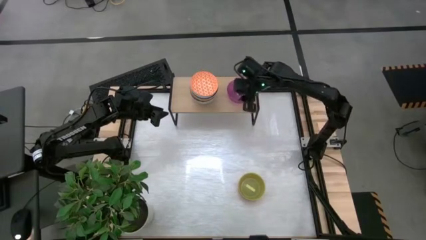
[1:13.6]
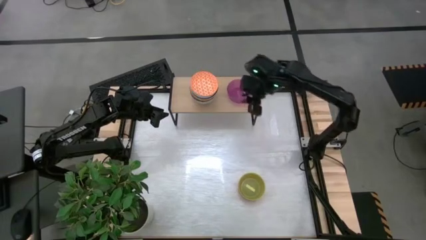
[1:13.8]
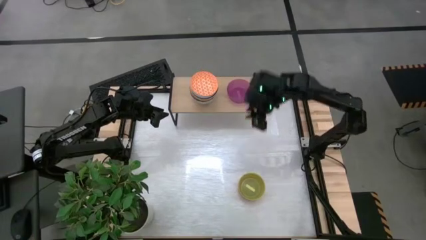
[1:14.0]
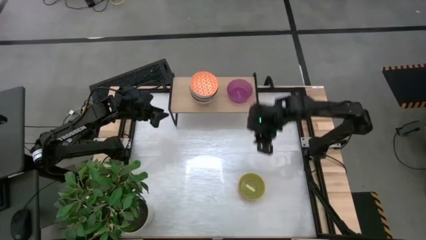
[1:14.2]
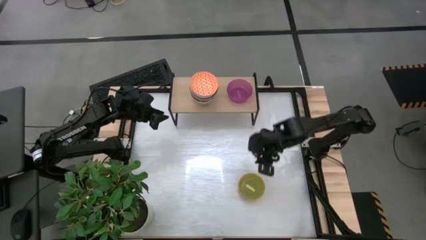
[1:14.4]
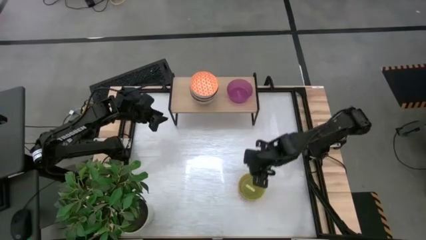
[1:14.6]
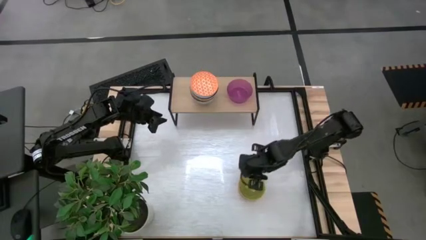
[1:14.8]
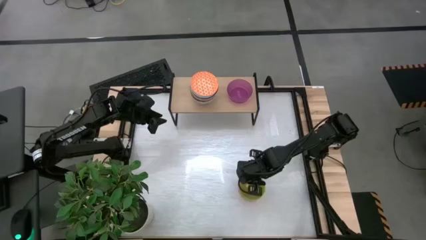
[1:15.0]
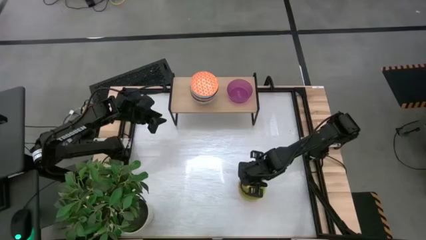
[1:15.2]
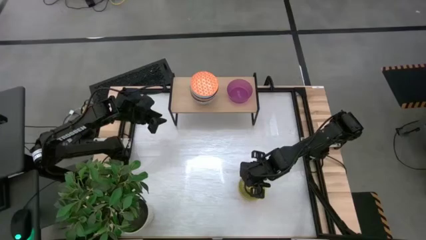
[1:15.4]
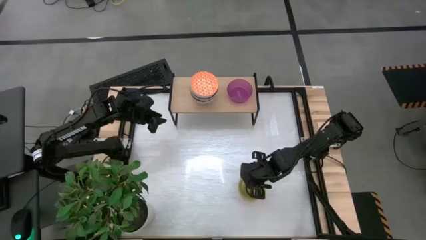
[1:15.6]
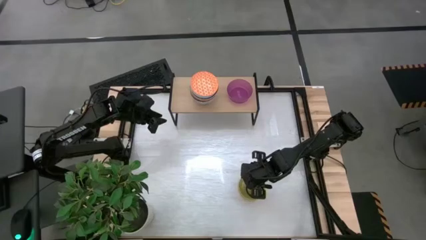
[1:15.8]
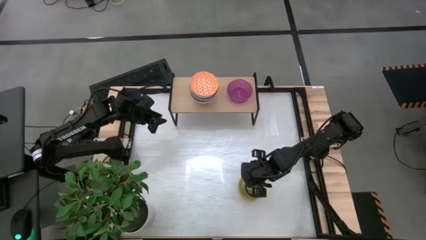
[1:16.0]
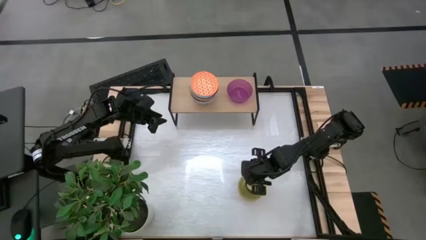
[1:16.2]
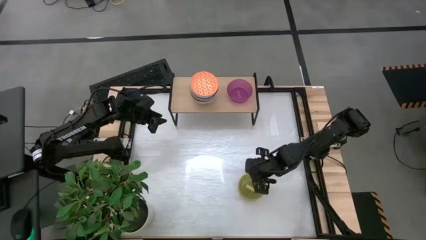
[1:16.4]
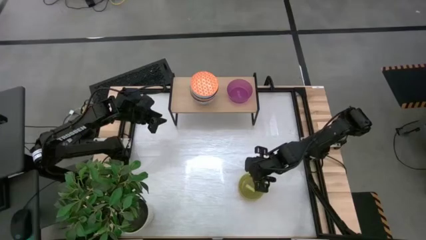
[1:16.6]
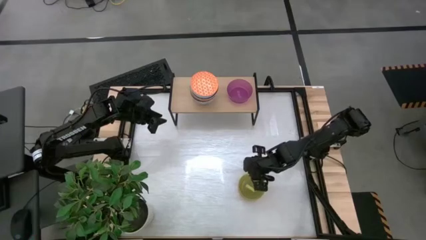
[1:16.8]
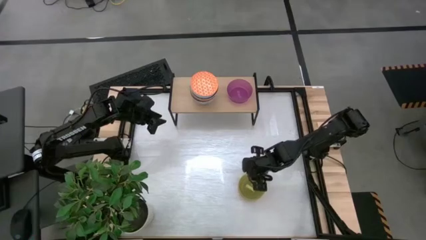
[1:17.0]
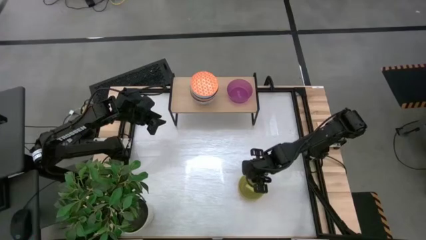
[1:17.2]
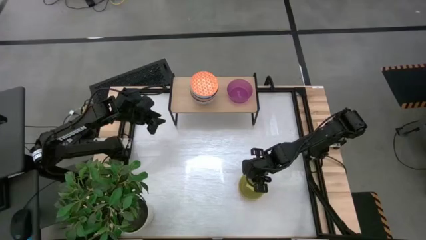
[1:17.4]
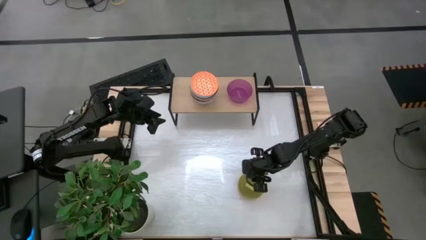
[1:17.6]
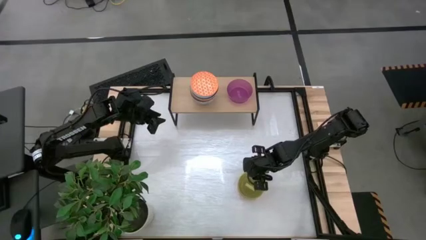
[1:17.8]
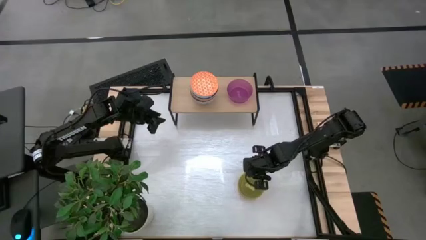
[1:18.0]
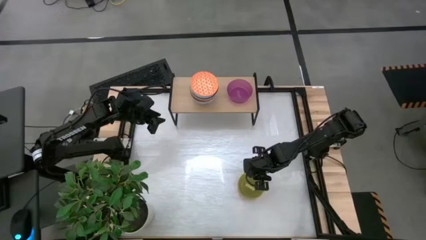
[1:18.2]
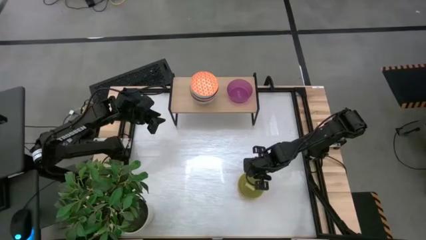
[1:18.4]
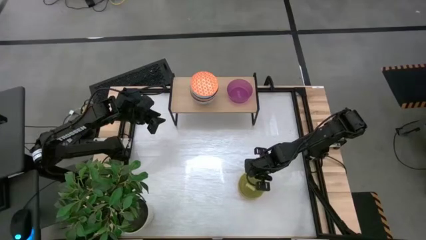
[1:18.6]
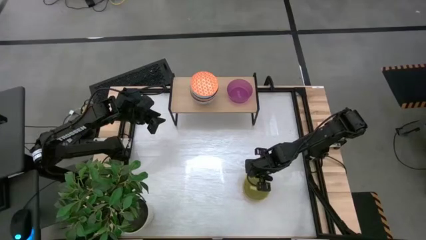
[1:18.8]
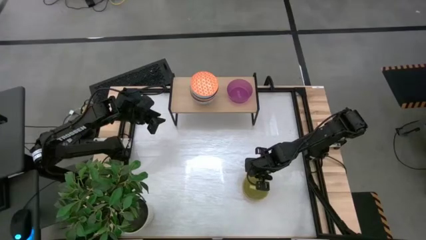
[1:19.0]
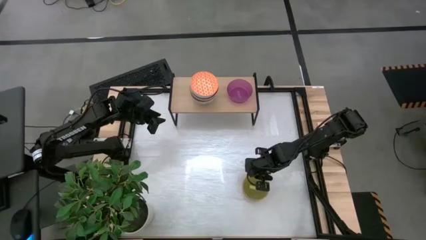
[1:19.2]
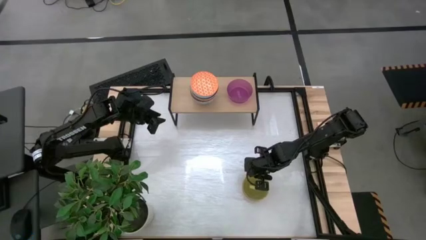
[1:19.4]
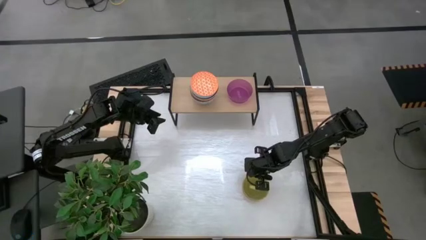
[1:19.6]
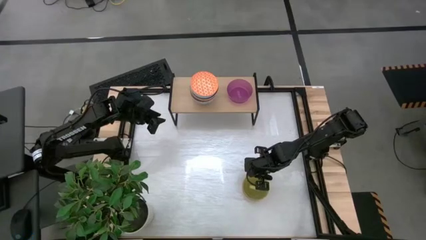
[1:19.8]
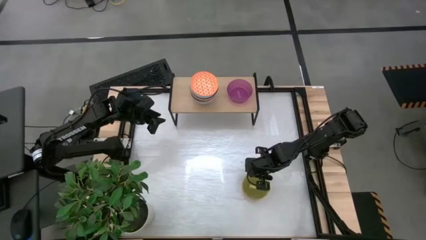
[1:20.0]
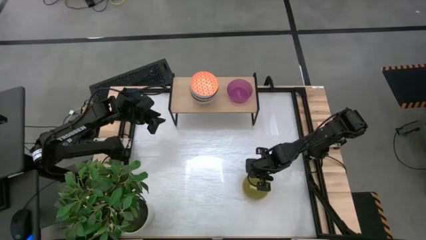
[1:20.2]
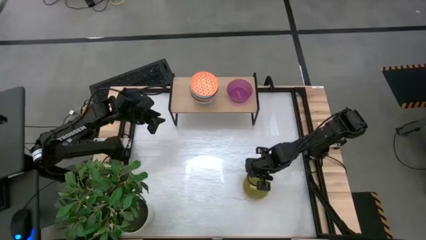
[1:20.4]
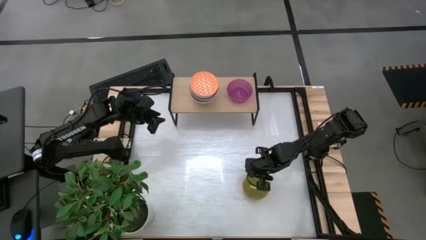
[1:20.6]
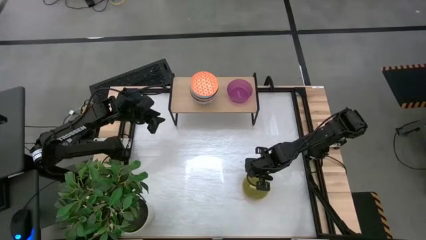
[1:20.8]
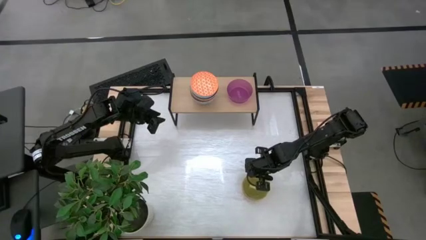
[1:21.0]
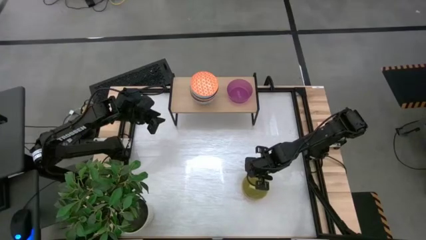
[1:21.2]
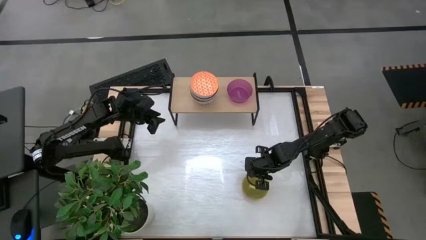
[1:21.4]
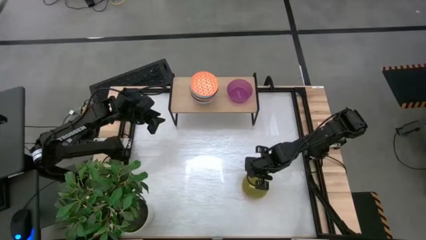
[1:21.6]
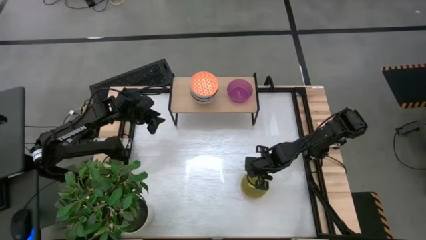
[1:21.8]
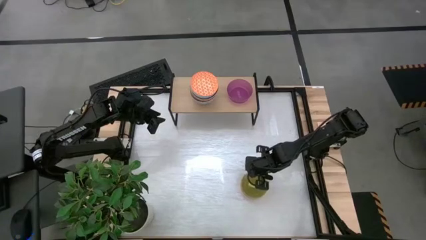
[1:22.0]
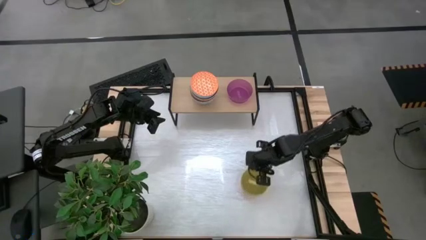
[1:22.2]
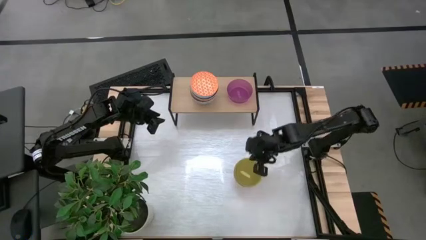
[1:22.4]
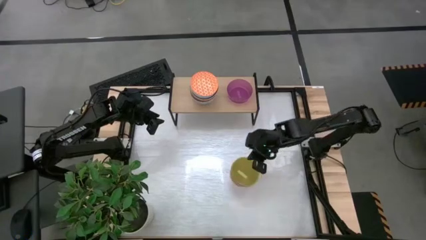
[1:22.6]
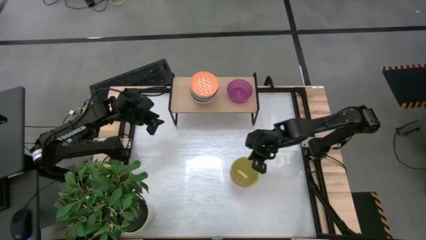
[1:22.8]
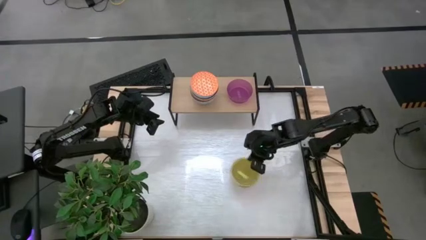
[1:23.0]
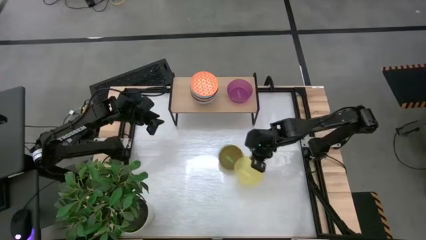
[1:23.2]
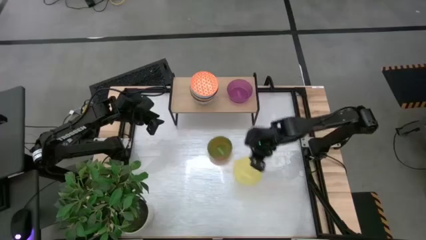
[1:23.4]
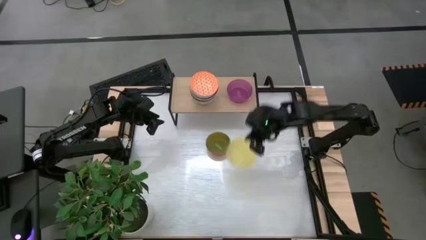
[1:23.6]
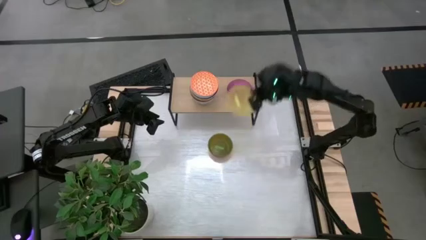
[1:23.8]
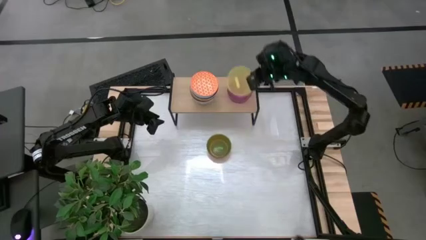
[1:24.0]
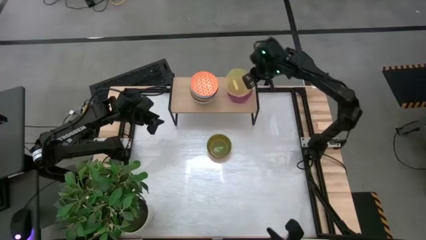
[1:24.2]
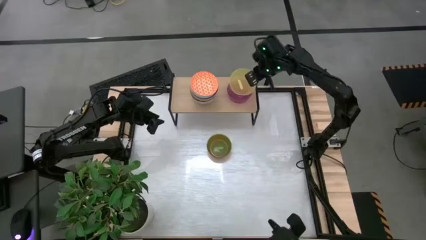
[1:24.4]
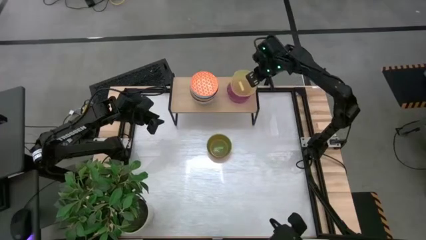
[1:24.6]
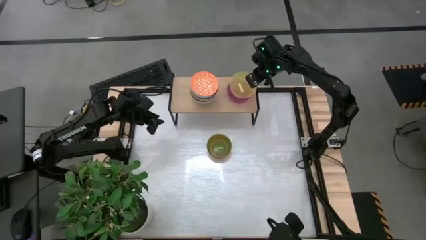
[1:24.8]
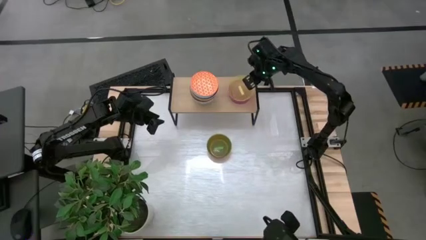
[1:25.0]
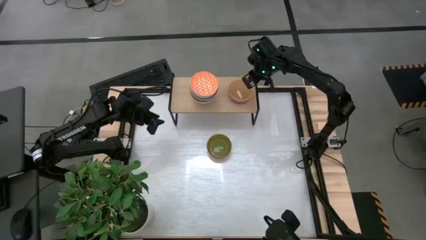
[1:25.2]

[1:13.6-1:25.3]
Task: Place and stack bowls onto a shelf
Stack the yellow bowl on top of the violet bowl on the shelf

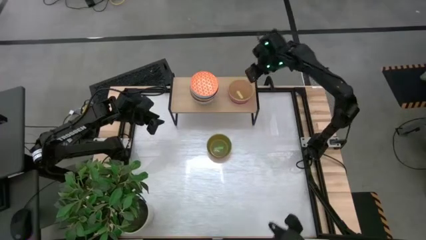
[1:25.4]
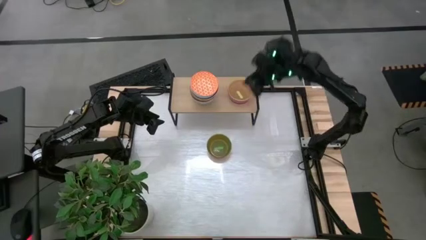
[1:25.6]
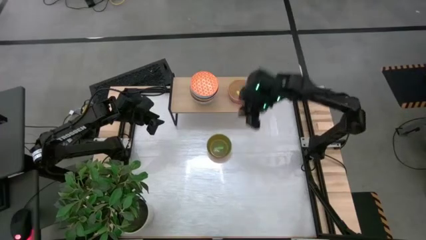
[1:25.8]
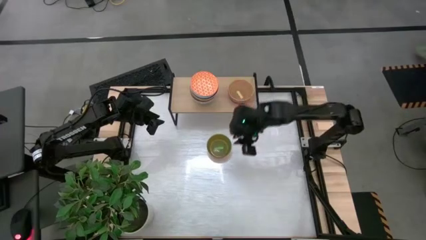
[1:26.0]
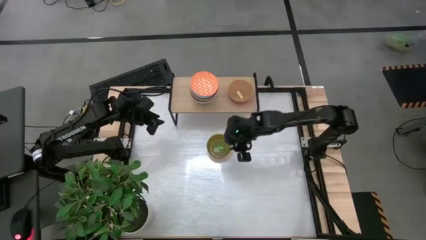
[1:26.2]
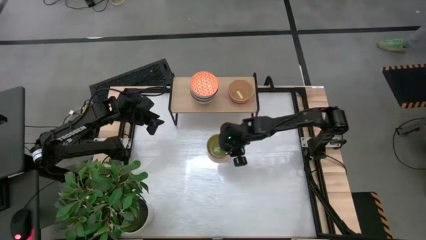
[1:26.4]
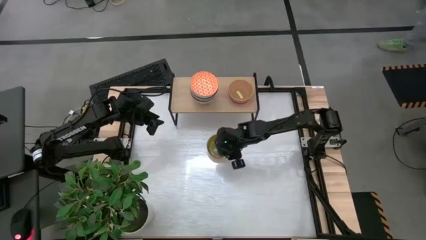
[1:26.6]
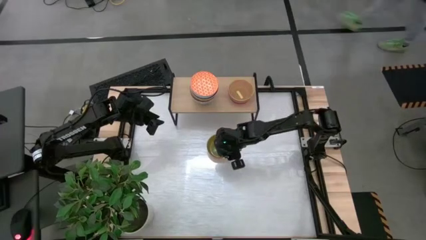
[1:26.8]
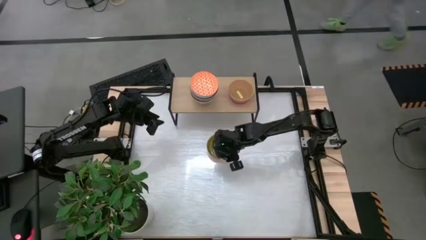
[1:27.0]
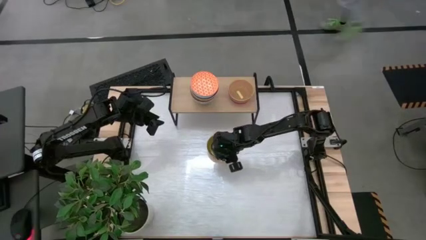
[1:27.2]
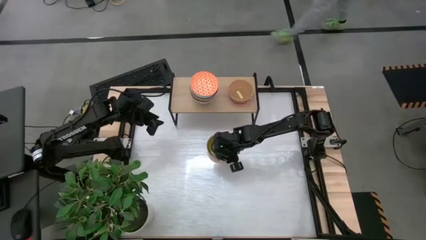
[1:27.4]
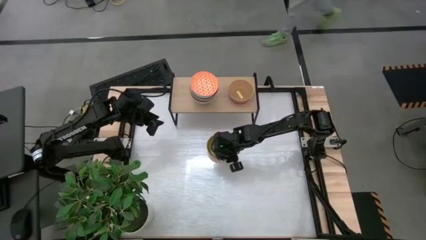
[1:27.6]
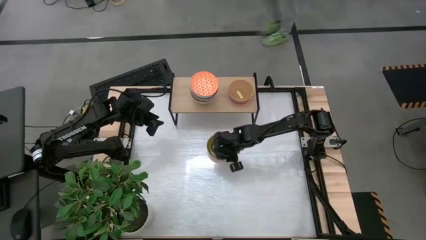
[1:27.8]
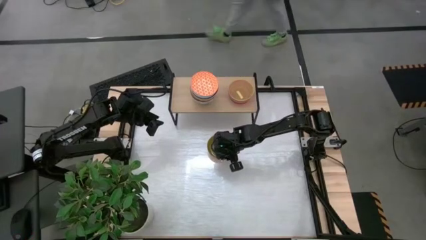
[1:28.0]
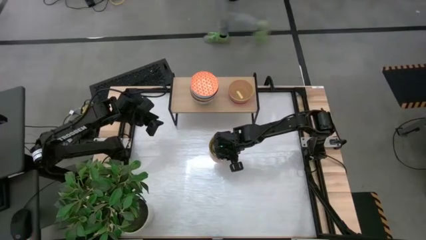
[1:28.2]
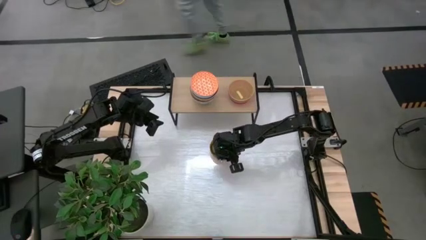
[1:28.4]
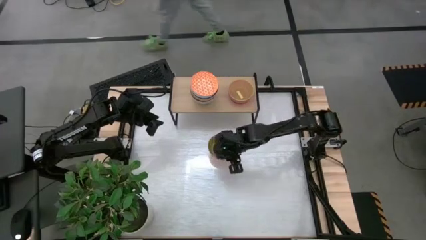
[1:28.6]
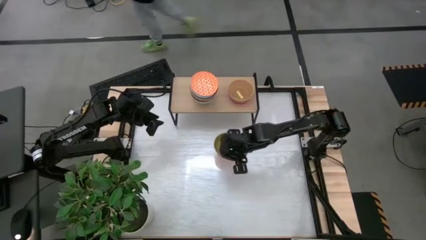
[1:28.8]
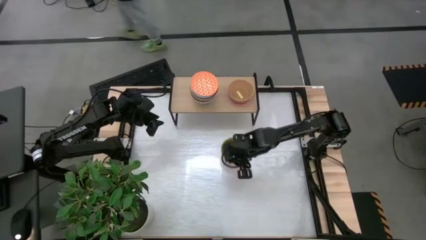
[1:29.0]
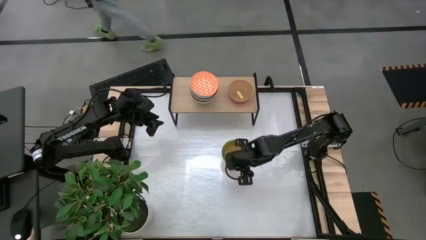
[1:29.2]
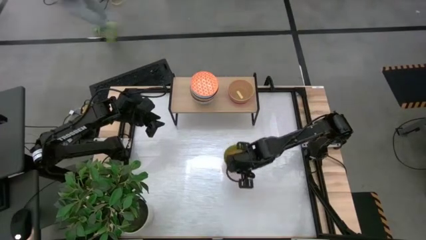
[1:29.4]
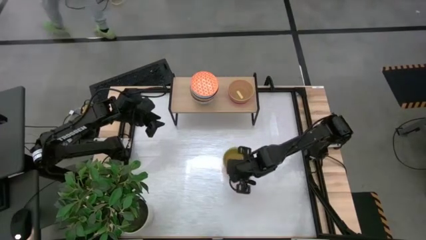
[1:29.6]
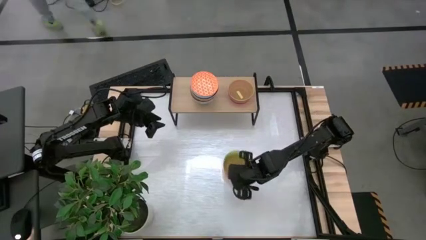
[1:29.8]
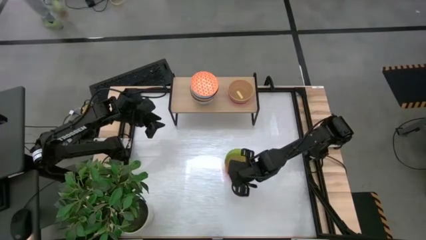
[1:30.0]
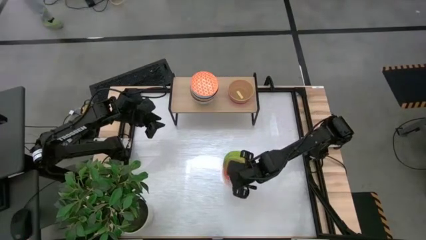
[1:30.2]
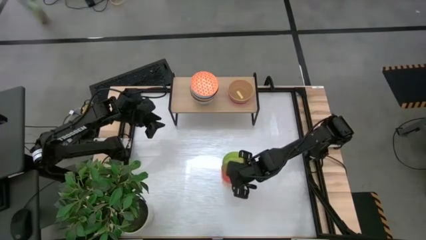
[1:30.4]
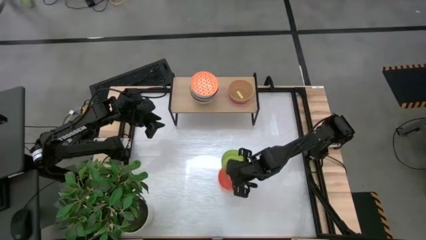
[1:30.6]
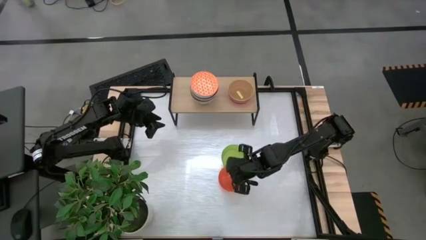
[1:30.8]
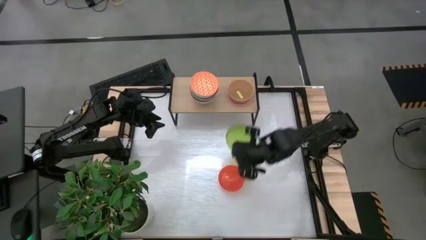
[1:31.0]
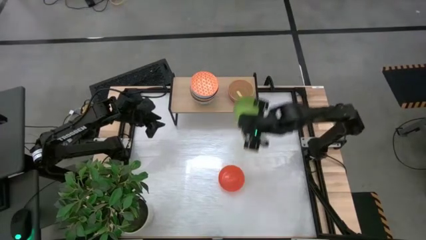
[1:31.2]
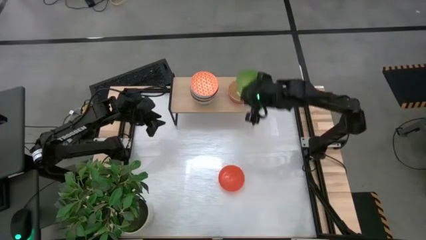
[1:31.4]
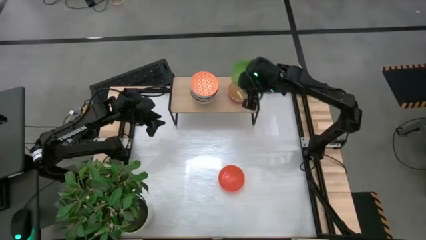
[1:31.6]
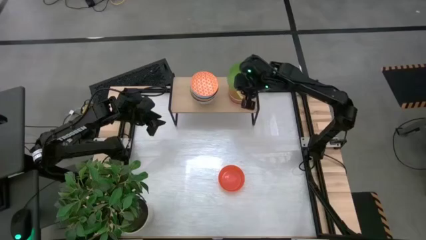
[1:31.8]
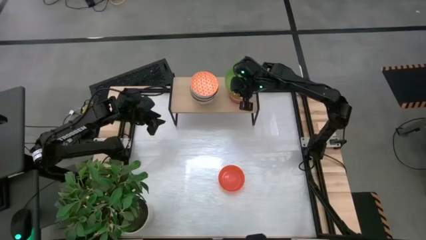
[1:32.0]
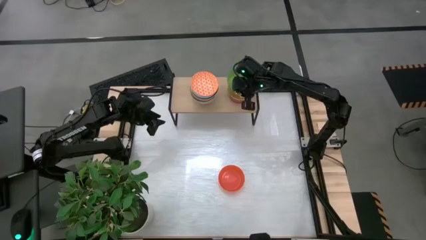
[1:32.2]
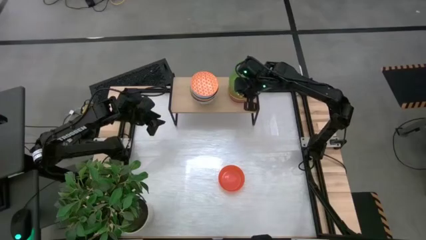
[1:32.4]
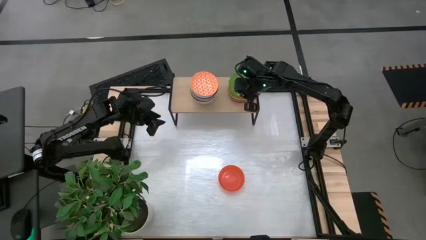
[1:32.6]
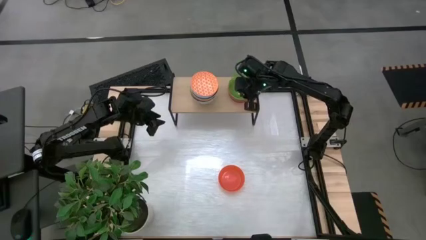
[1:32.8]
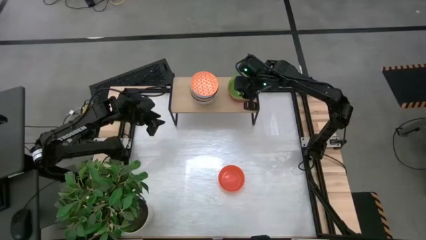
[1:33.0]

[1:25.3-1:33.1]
Stack the green bowl on top of the yellow bowl on the shelf
